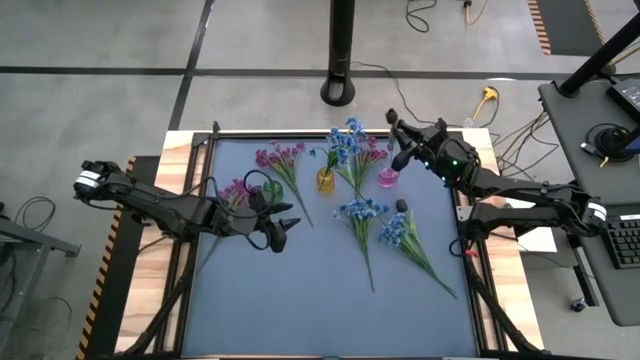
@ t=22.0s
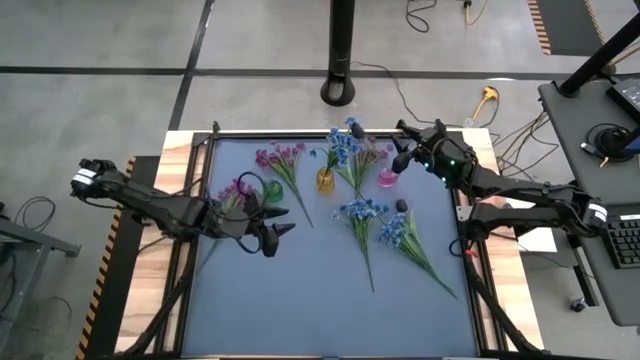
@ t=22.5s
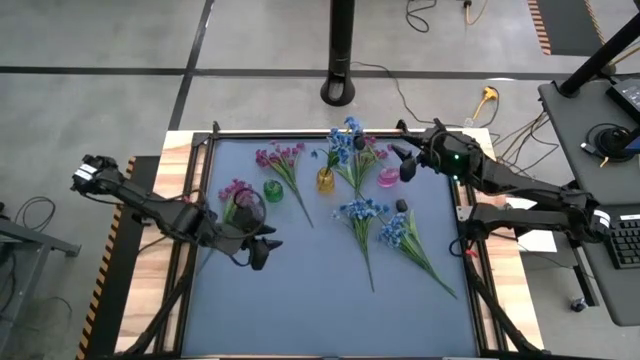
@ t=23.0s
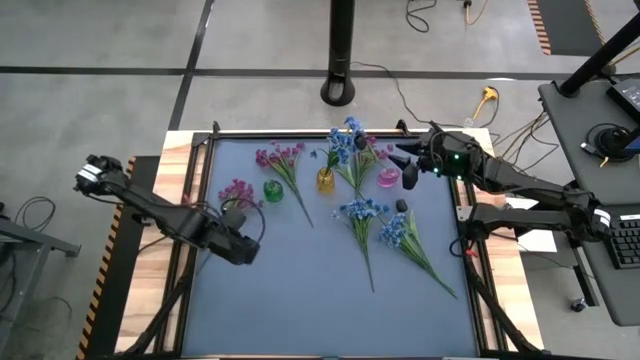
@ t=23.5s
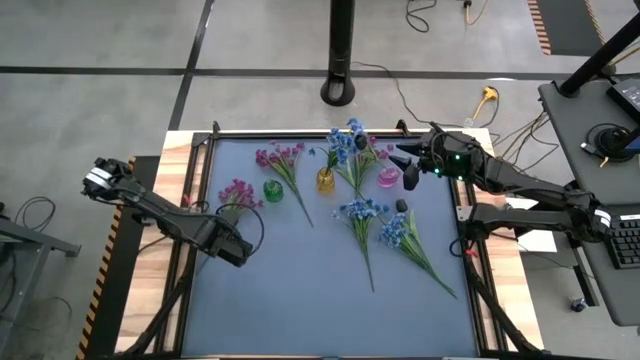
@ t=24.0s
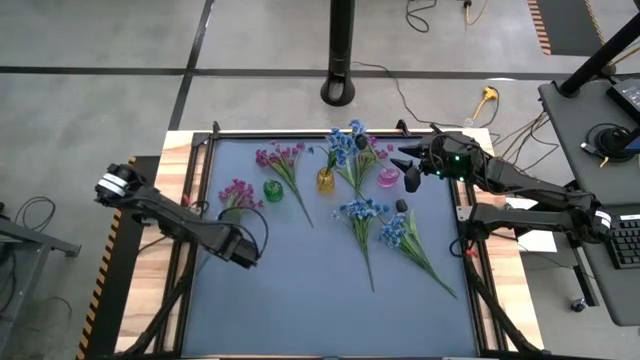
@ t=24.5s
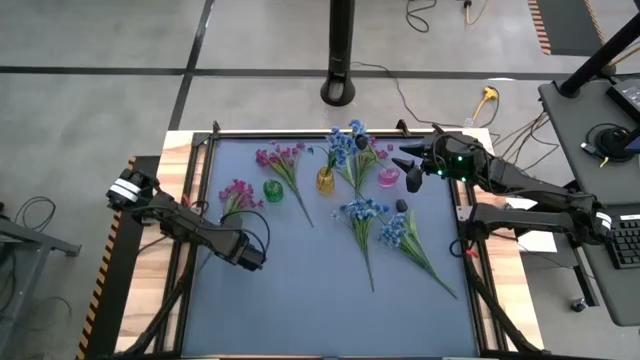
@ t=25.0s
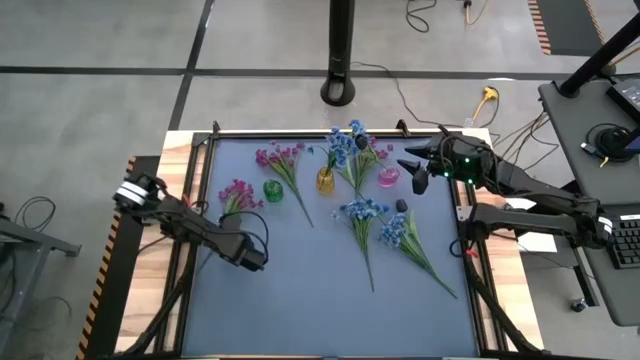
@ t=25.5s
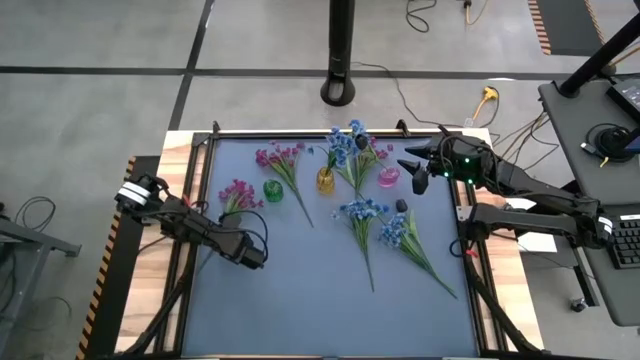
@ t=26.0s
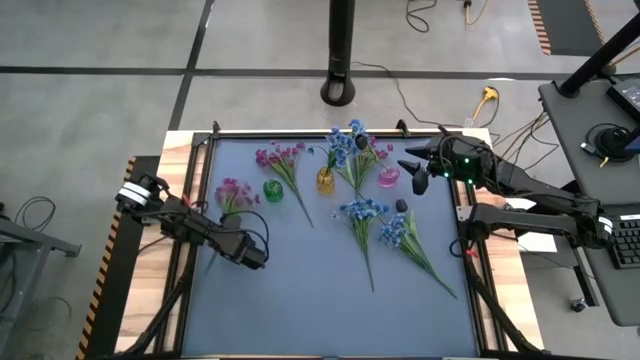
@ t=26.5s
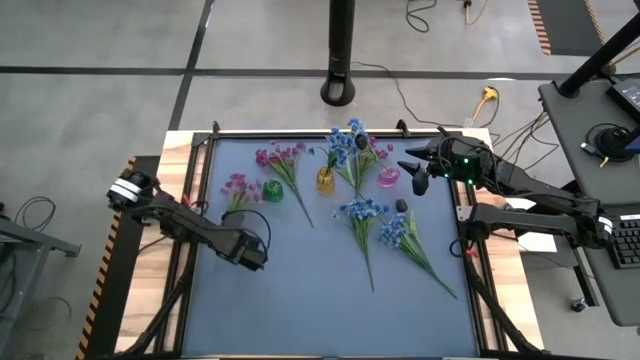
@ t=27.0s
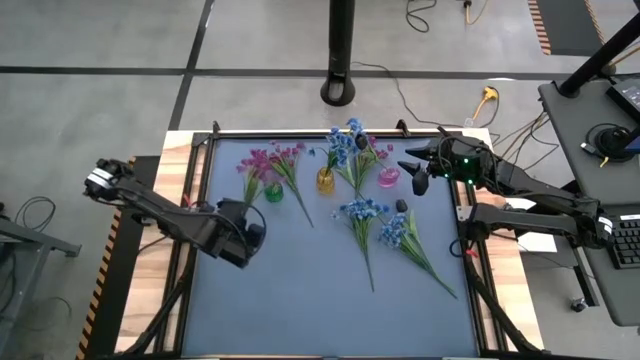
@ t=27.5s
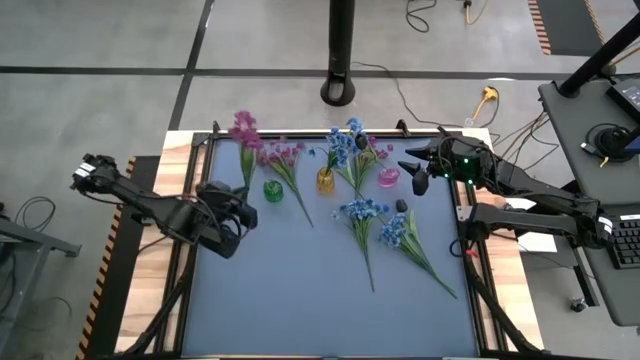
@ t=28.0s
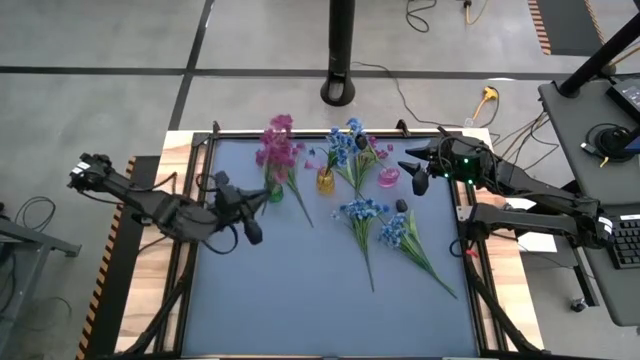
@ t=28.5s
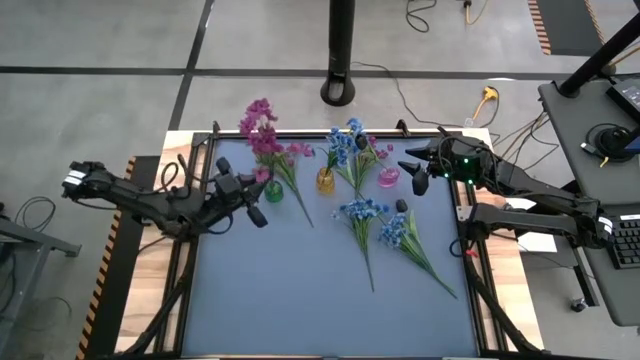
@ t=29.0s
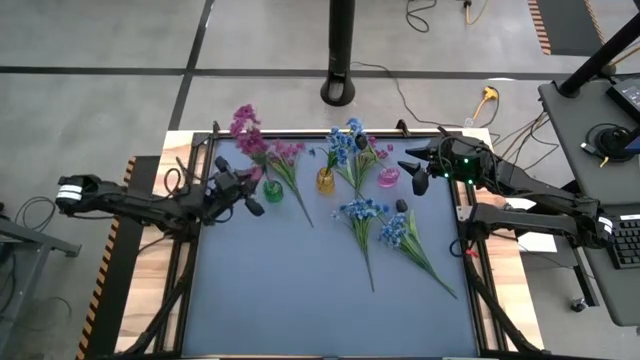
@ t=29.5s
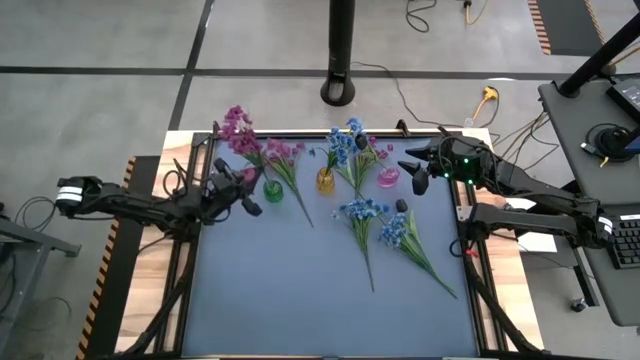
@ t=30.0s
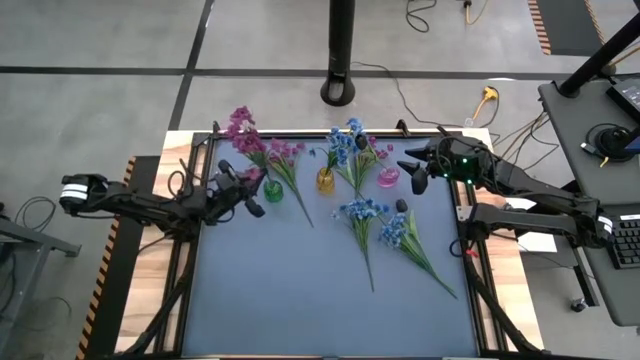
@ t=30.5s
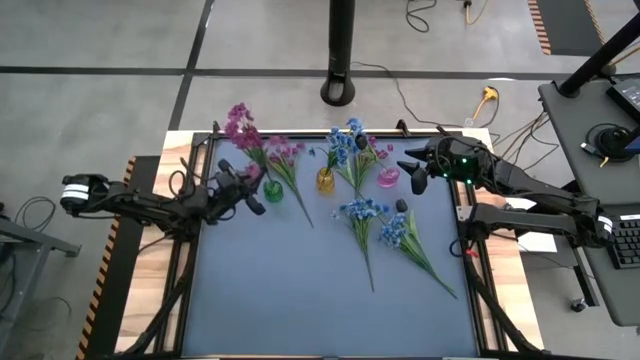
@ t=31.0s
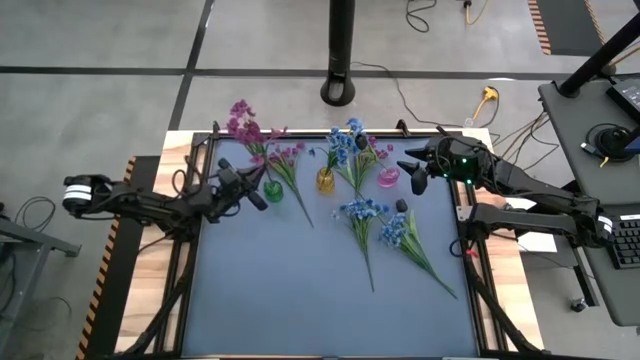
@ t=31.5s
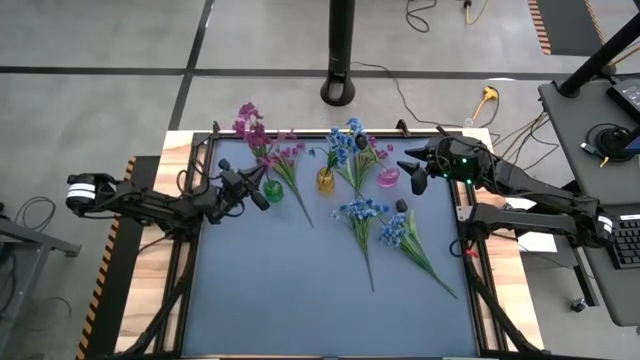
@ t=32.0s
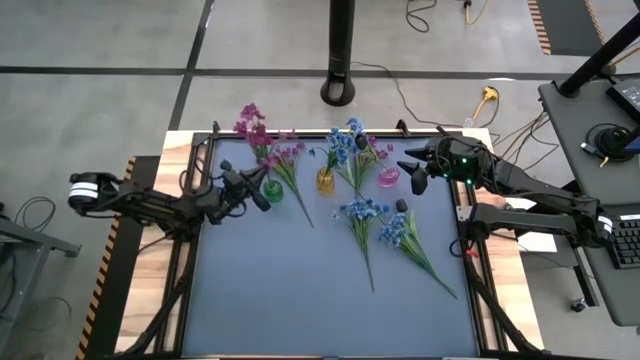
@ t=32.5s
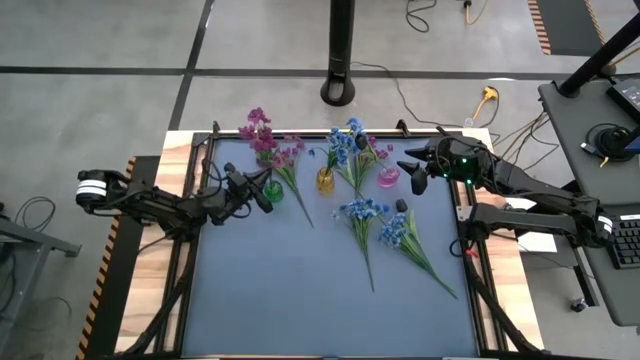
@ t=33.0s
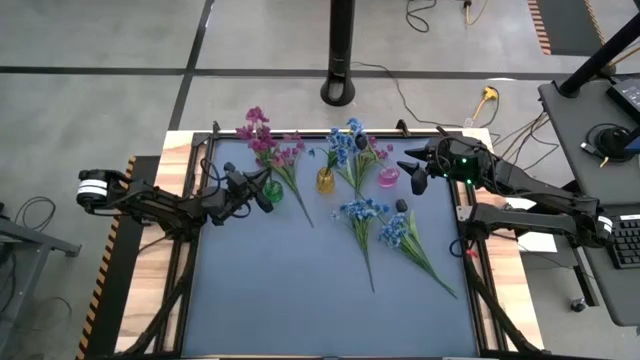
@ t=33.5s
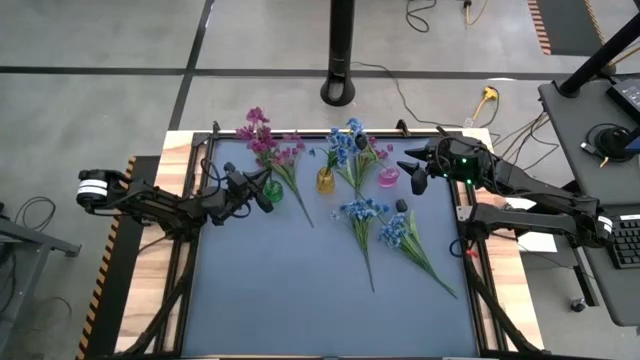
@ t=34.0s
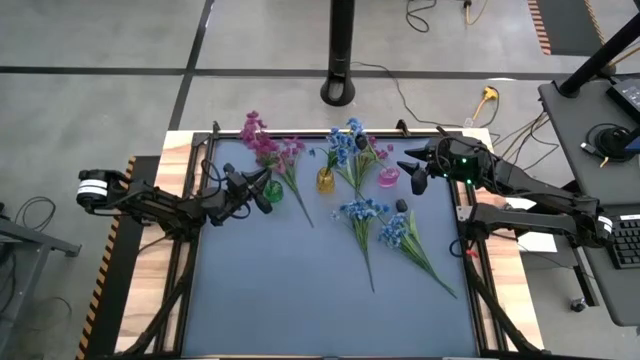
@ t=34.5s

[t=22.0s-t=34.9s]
Task: Sort flowers into vase by color
Put the left purple flowers into the green flower vase
